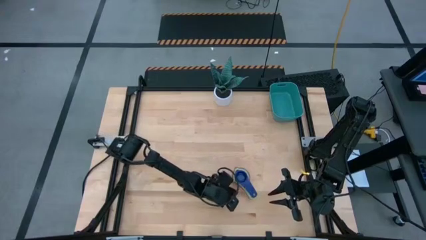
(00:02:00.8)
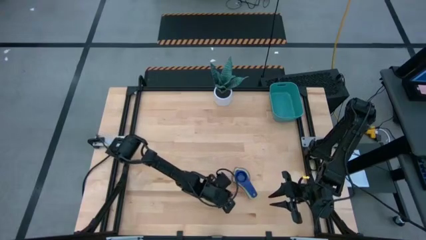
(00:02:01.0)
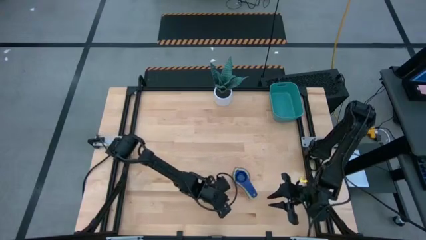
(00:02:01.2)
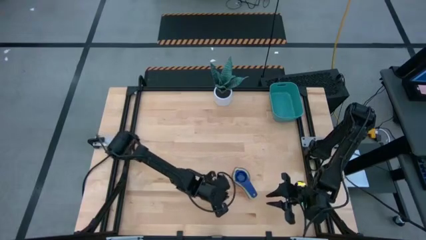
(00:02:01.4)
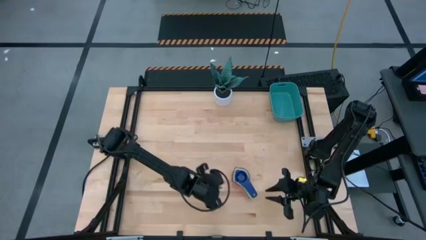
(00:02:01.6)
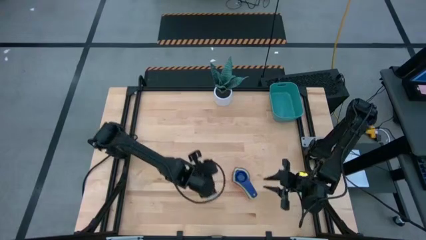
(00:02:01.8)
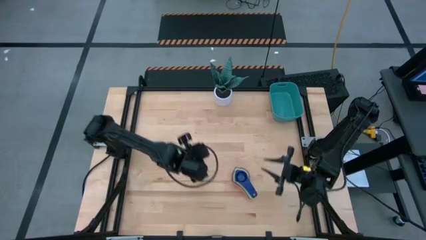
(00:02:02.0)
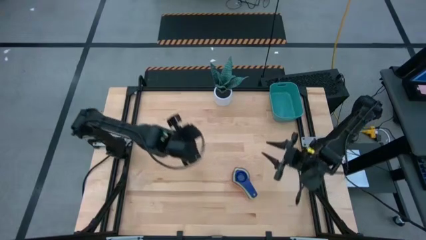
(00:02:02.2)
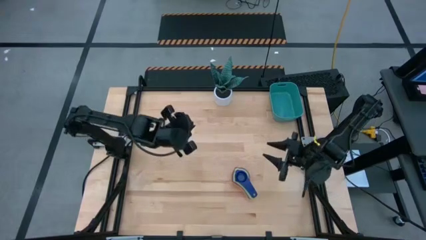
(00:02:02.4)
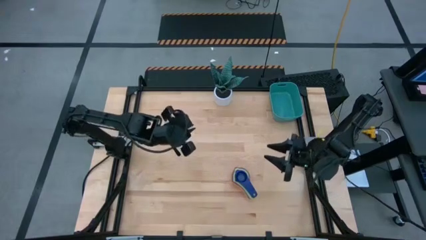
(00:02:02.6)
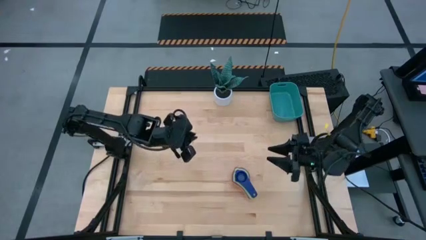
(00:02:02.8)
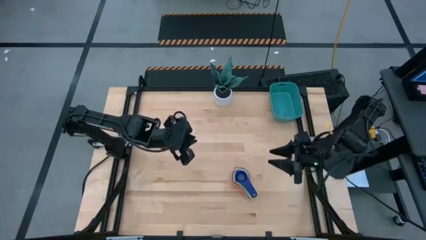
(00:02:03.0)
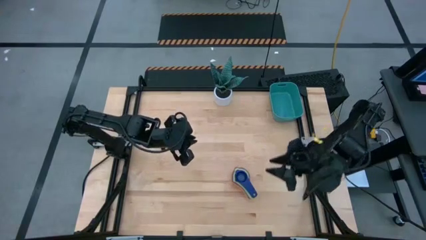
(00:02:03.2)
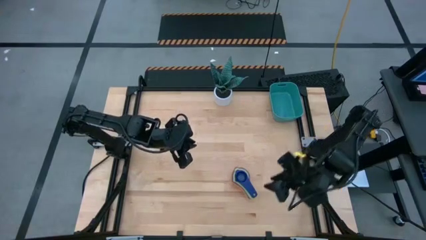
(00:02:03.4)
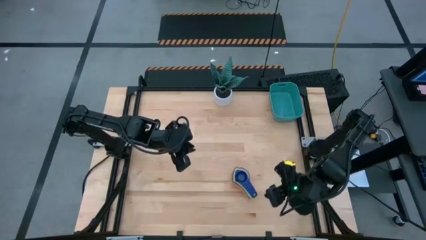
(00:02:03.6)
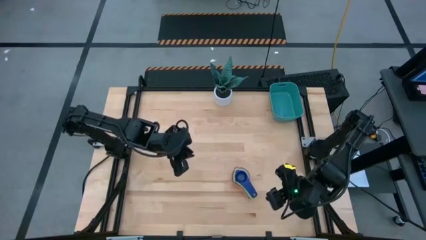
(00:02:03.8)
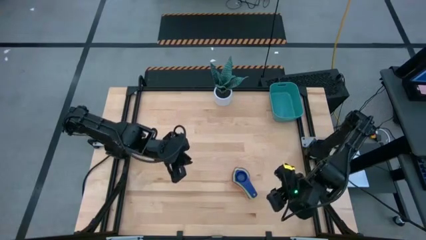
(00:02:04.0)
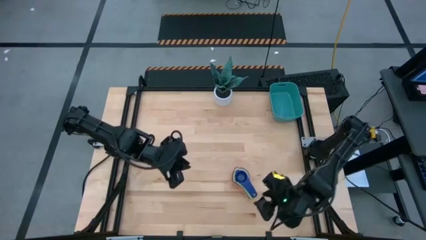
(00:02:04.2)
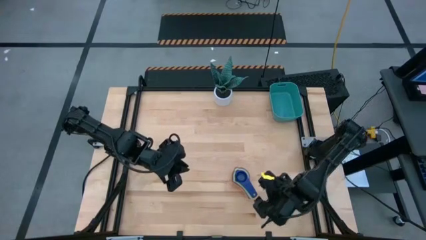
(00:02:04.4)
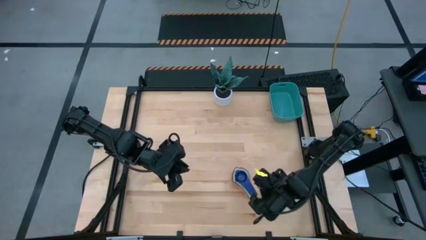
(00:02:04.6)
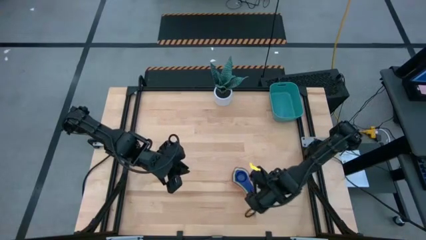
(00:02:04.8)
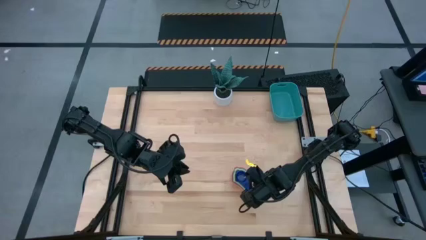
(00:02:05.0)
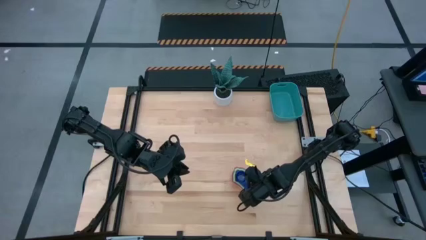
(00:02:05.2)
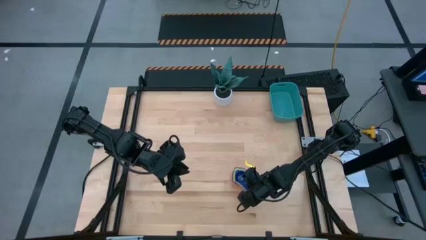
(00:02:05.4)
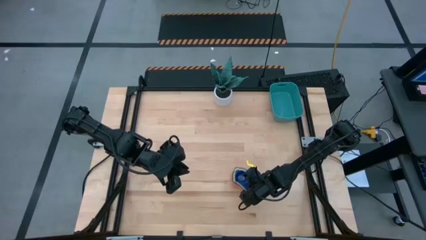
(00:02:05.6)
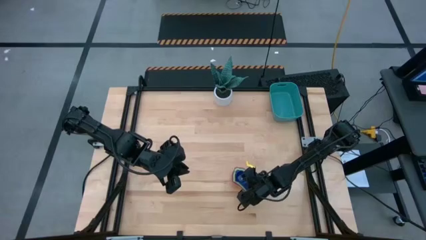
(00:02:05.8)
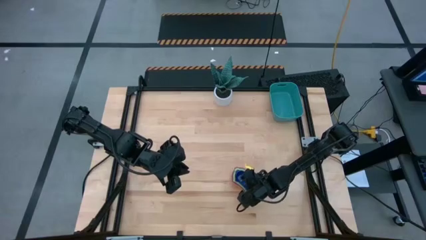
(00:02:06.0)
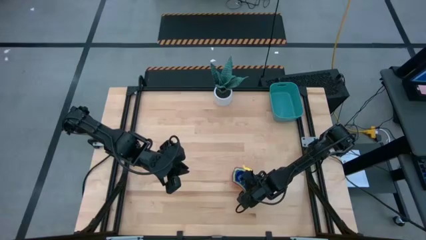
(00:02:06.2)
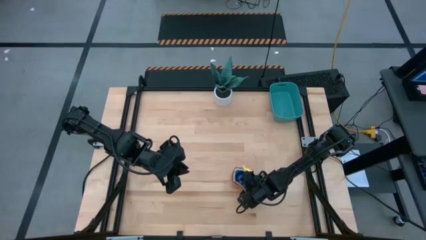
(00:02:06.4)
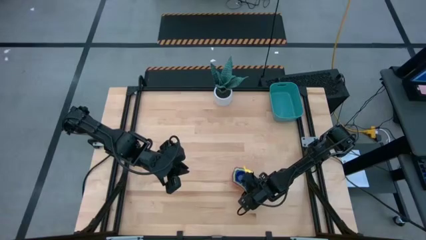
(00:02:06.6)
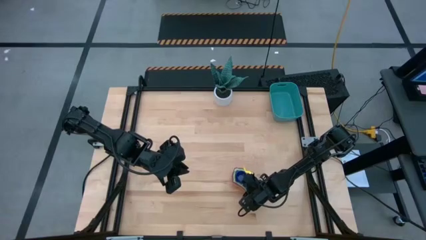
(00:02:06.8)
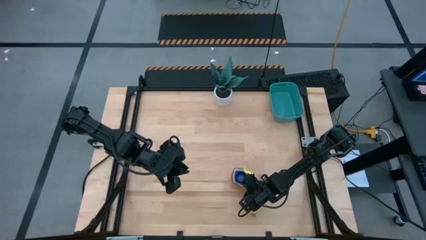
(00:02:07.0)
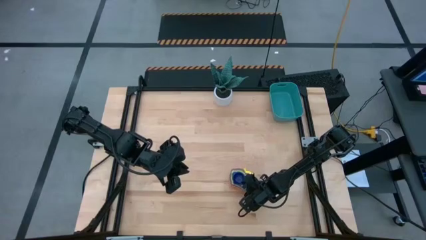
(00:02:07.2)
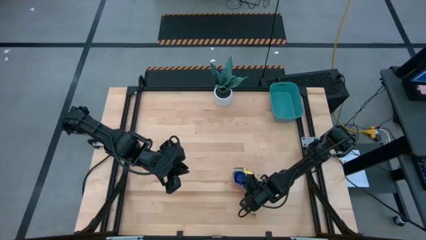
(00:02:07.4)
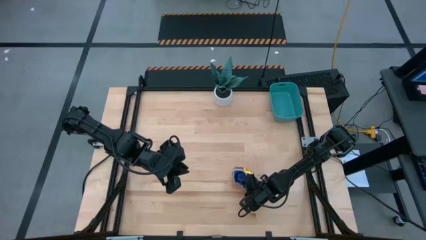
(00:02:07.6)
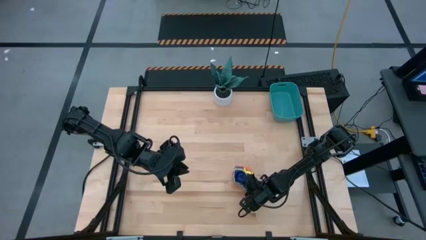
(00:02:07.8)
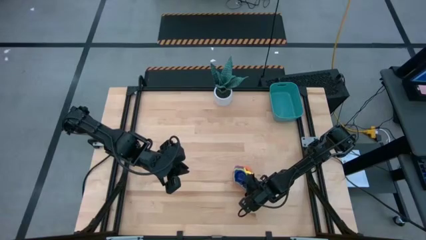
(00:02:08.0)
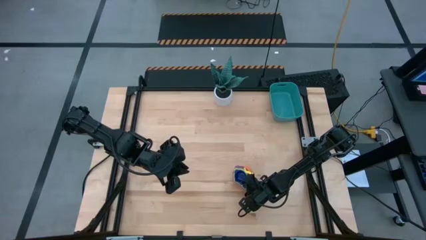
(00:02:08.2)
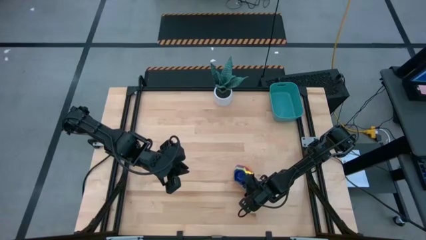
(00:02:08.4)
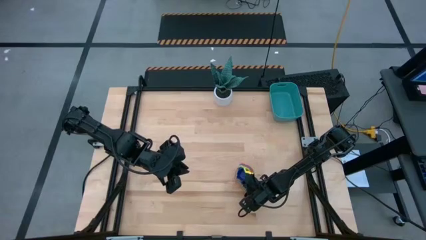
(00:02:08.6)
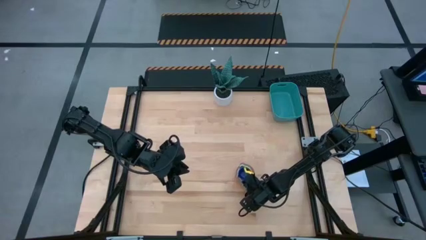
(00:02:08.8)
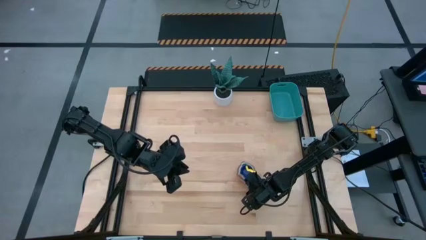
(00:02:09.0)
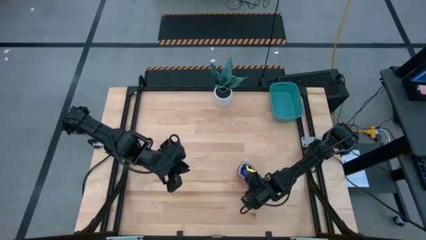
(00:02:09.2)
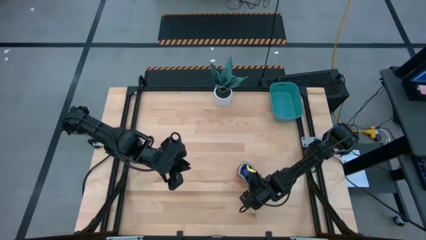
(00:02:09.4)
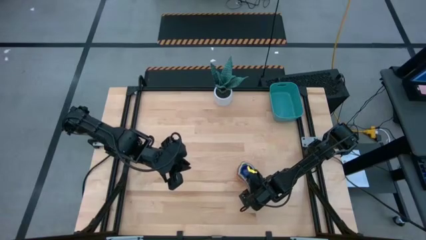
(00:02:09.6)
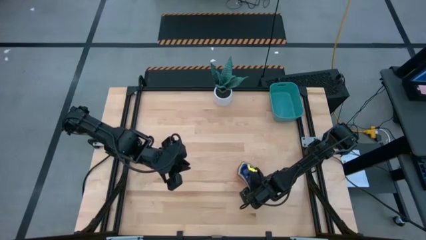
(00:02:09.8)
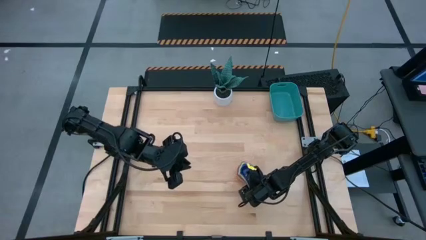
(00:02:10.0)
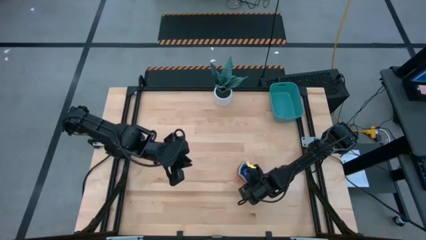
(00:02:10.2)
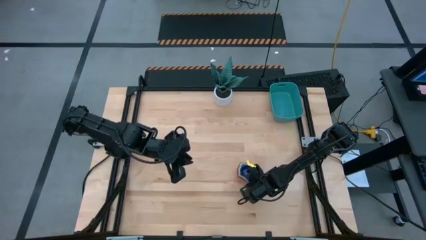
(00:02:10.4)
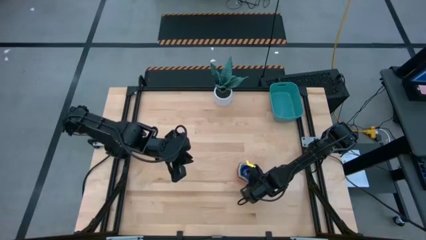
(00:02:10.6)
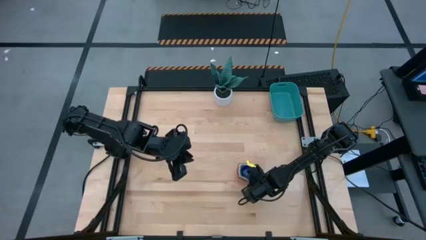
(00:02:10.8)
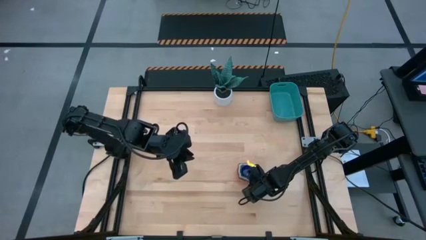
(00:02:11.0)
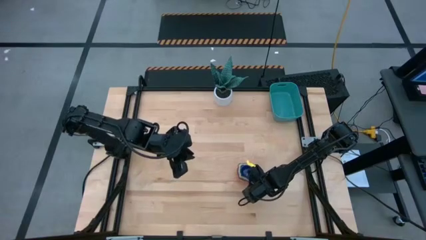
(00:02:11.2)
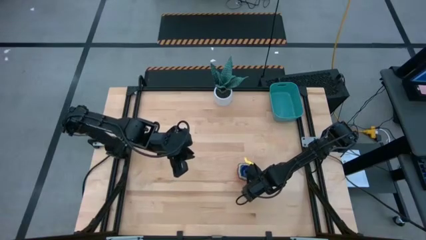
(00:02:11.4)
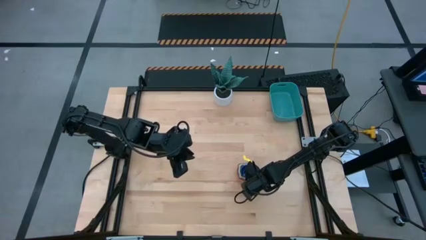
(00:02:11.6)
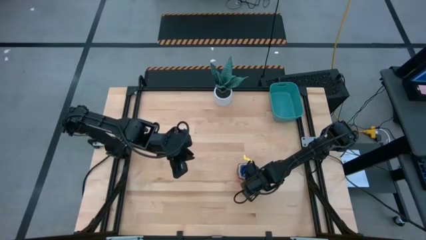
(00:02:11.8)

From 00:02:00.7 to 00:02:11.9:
Task: Nest measuring cups in basket
Put the nested measuring cups into the green bin

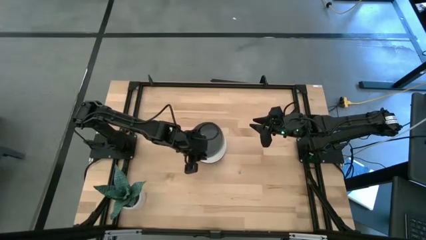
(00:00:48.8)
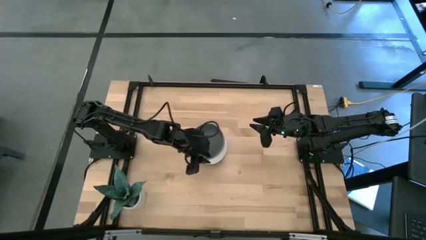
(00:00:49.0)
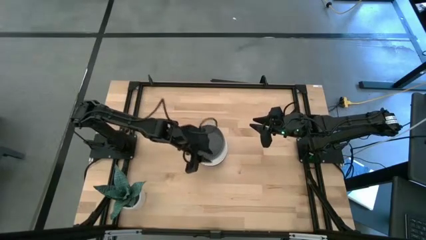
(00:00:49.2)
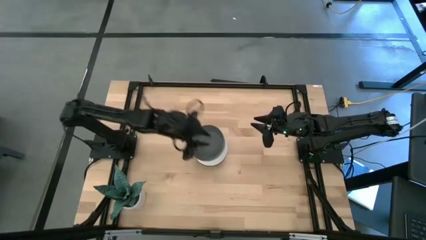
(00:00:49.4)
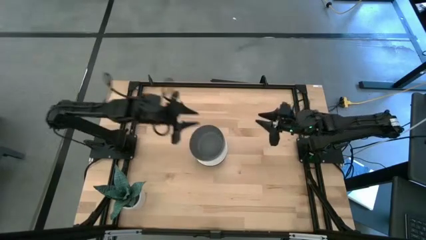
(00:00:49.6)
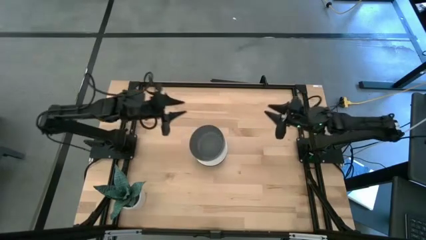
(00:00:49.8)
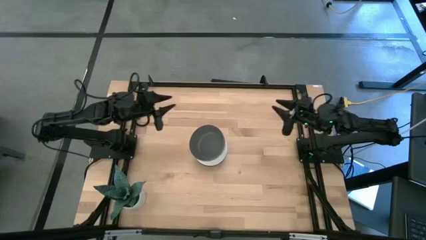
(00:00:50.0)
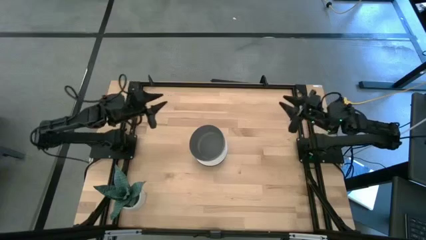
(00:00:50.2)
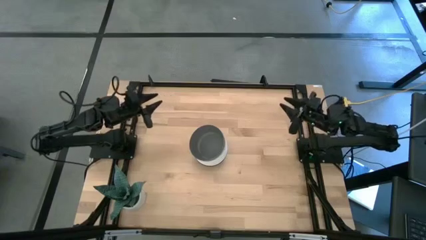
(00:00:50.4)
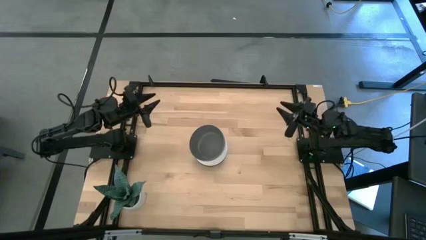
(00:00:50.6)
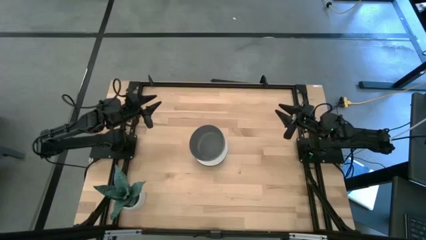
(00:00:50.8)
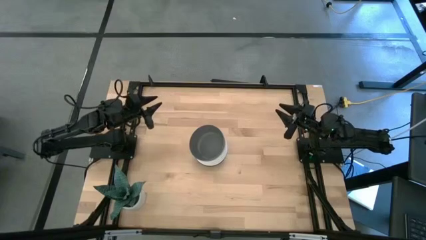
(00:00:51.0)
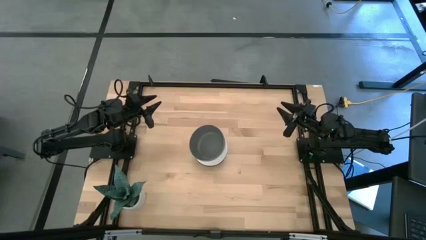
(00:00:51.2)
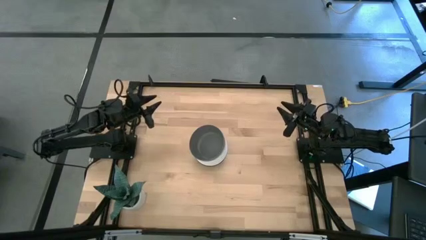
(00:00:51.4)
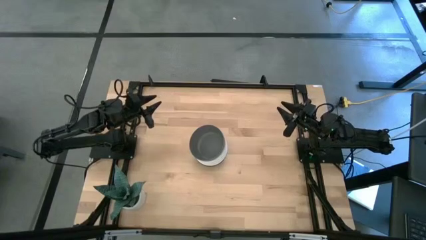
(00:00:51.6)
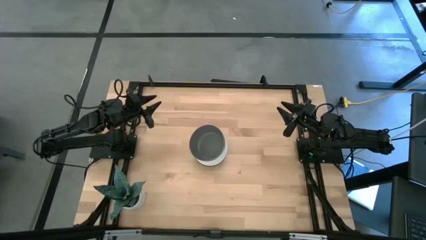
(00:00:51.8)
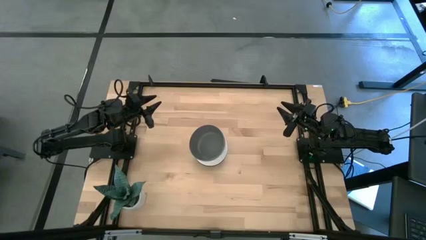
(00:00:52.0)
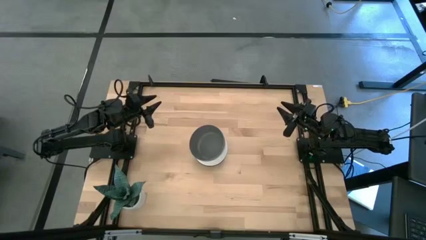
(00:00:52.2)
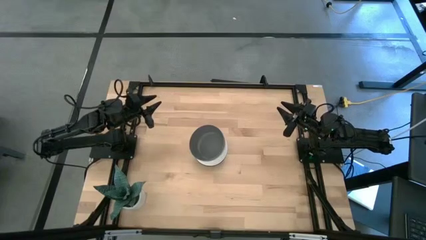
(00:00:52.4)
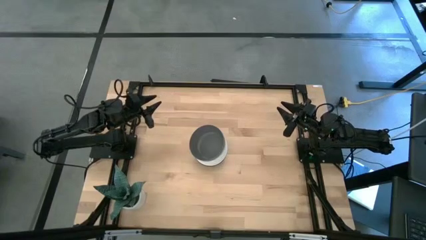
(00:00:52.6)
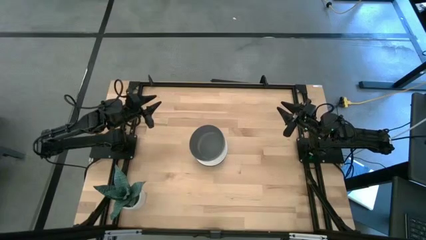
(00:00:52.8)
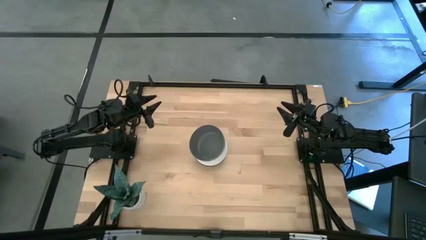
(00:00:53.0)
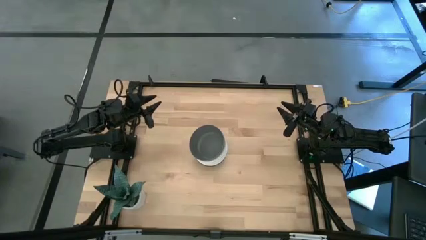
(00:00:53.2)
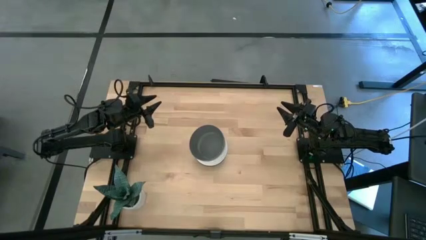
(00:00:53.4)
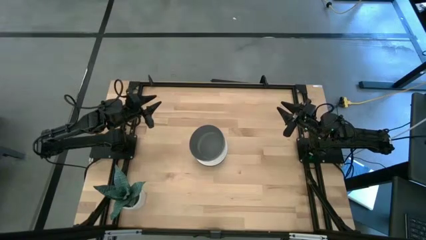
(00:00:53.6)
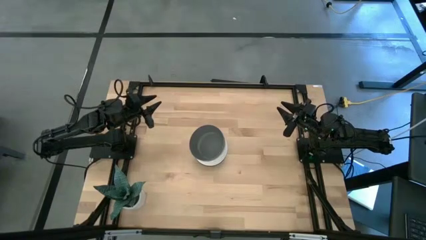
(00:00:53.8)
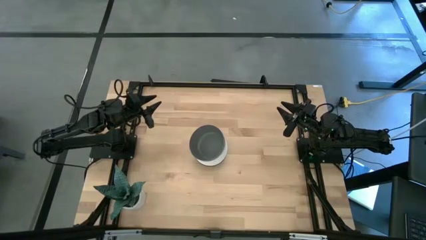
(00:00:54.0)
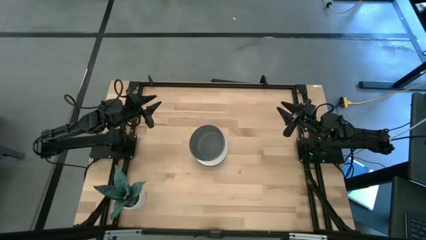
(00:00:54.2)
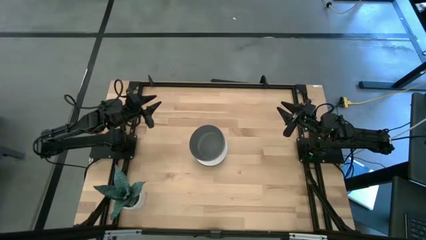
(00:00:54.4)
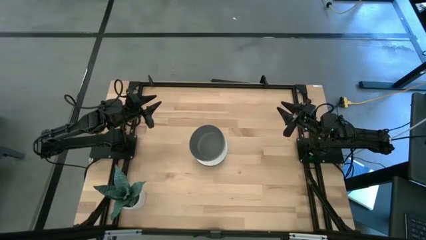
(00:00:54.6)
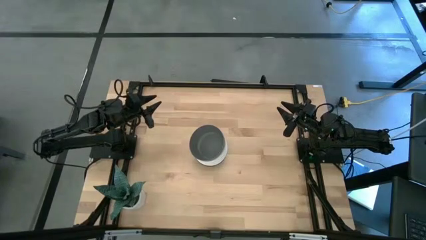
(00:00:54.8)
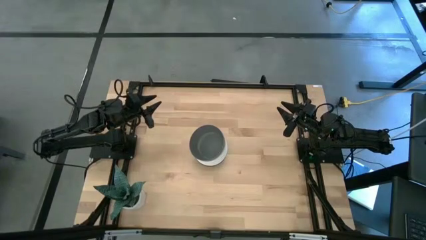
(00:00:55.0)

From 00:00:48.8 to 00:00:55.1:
Task: Nest bowls inside each other
Return to Home Position
